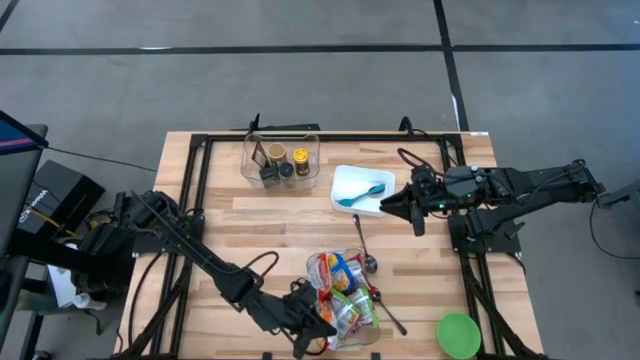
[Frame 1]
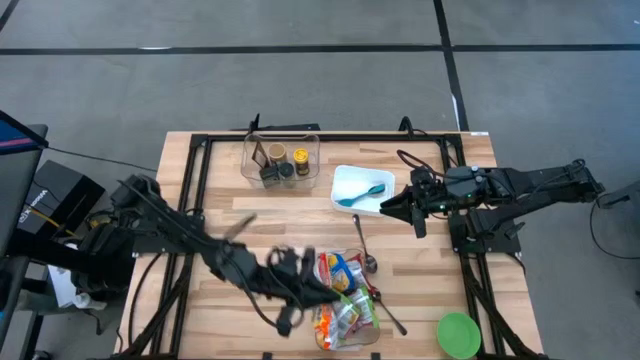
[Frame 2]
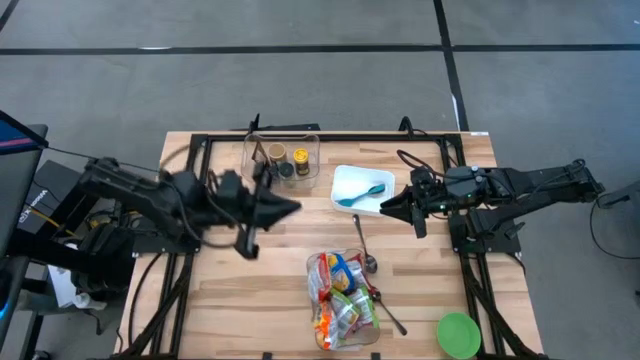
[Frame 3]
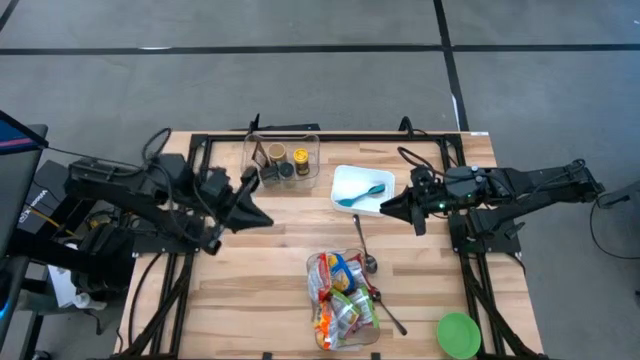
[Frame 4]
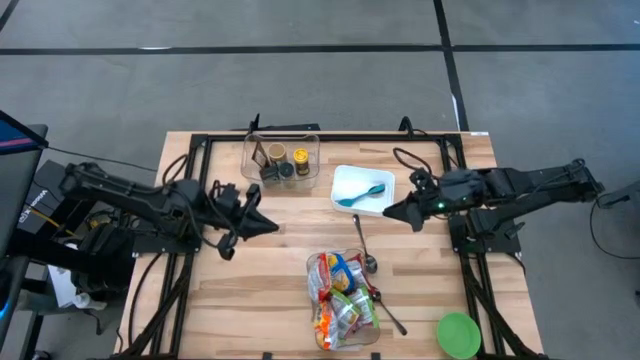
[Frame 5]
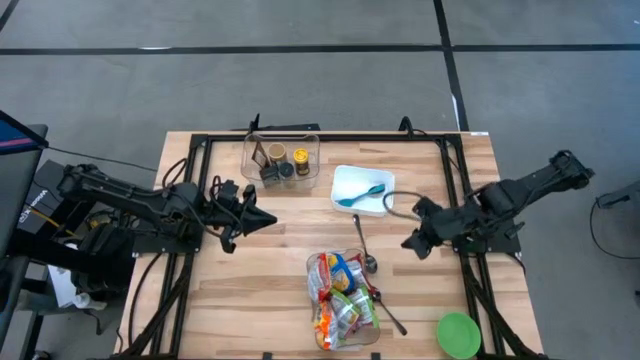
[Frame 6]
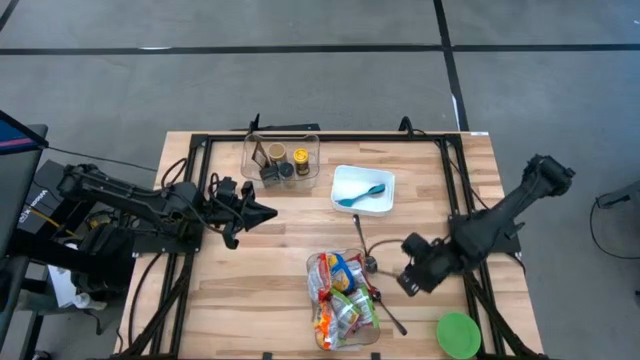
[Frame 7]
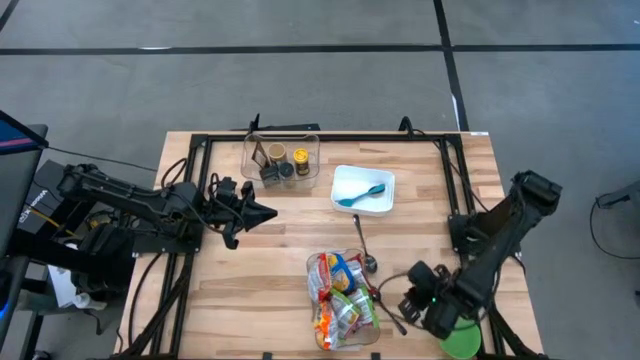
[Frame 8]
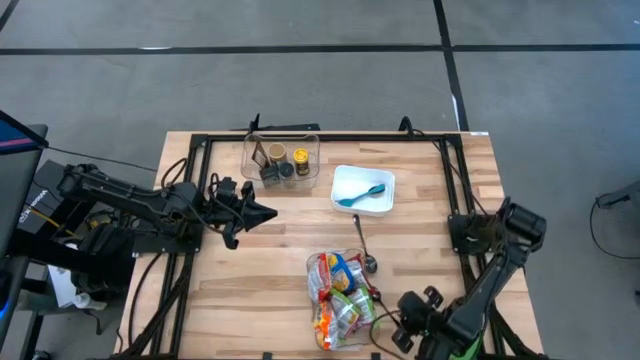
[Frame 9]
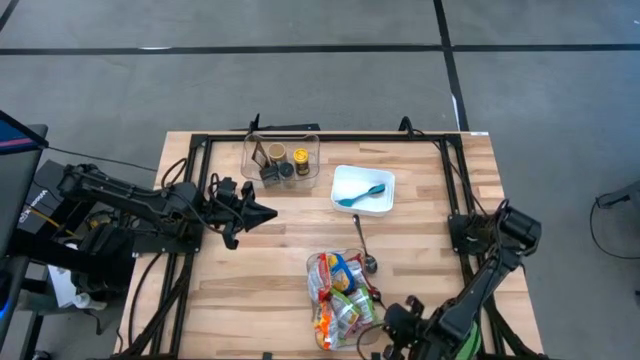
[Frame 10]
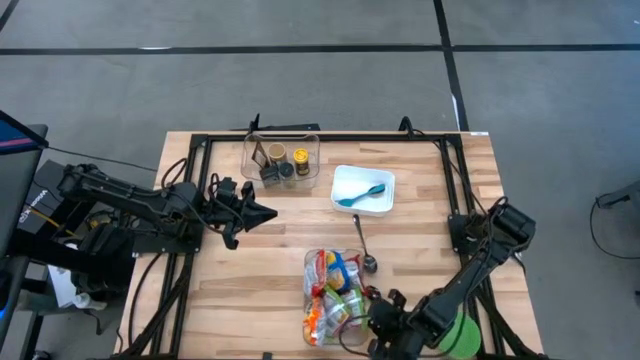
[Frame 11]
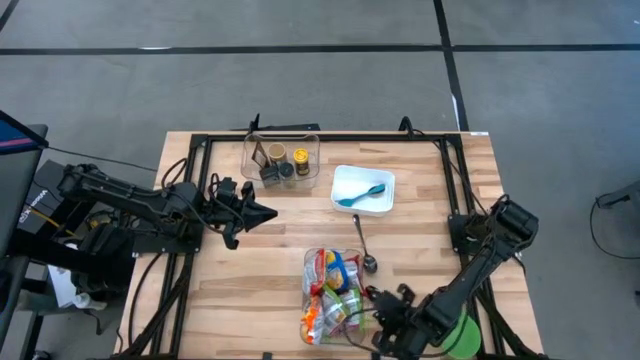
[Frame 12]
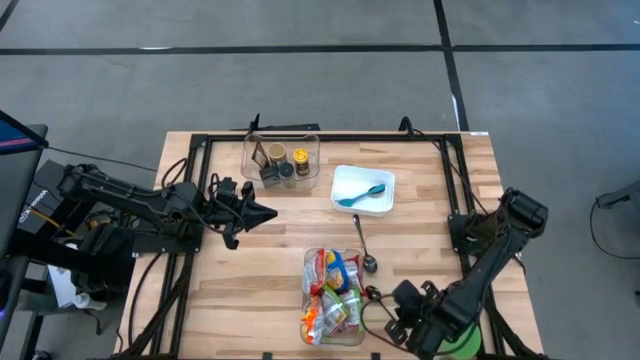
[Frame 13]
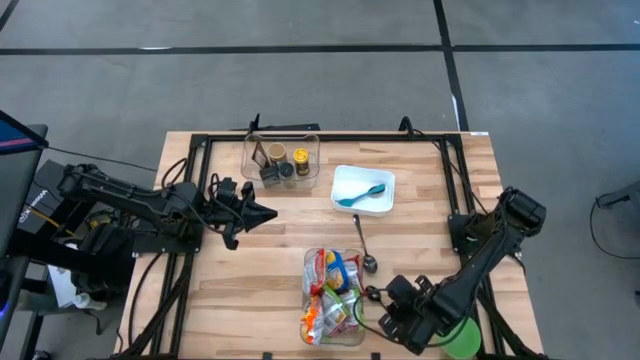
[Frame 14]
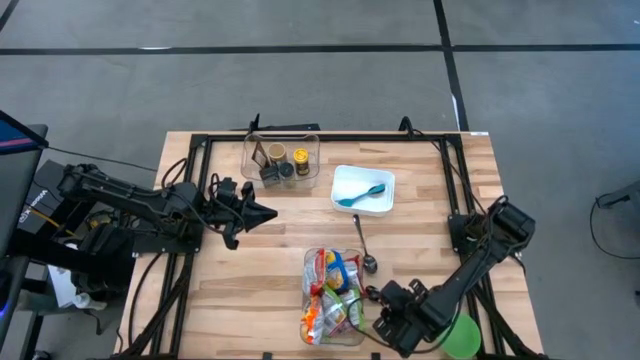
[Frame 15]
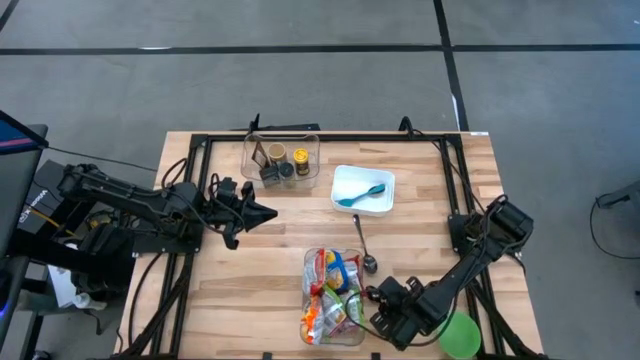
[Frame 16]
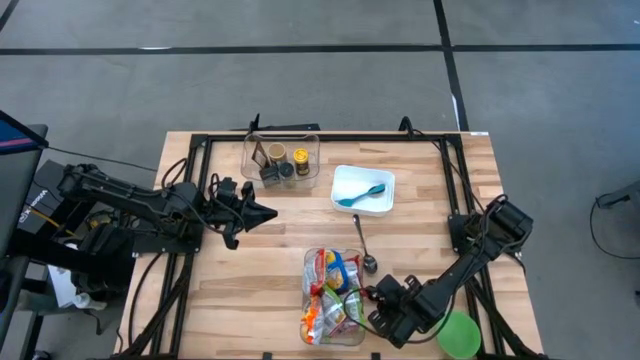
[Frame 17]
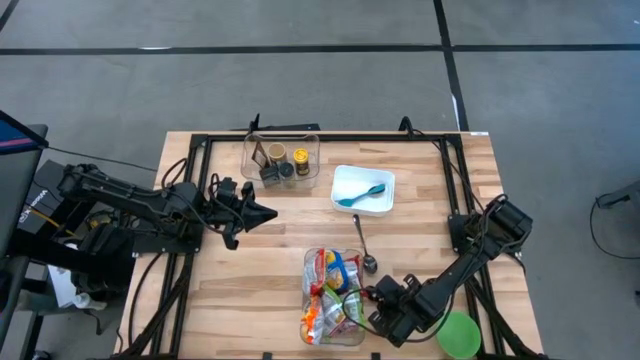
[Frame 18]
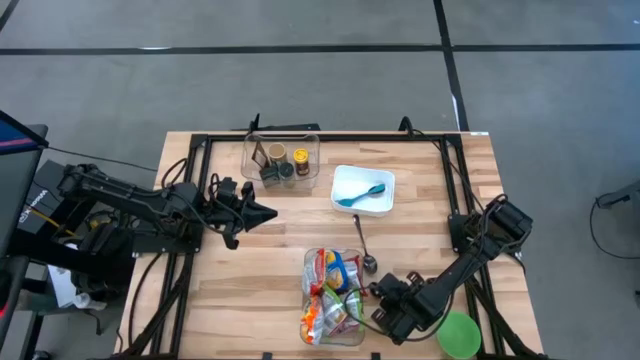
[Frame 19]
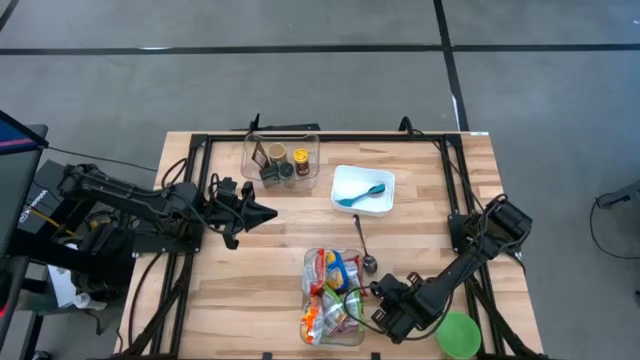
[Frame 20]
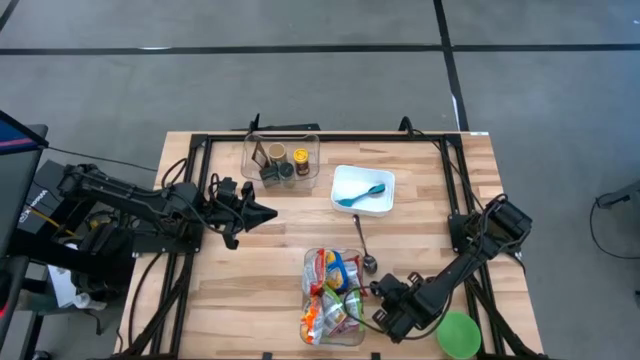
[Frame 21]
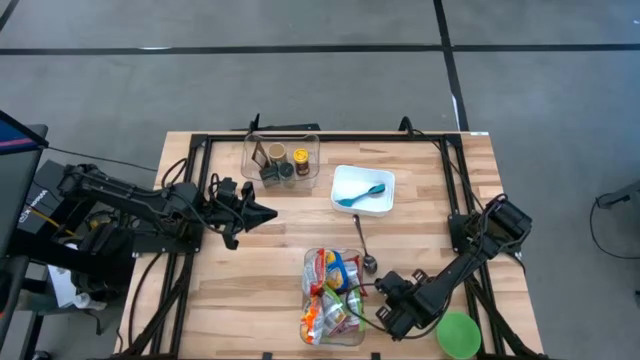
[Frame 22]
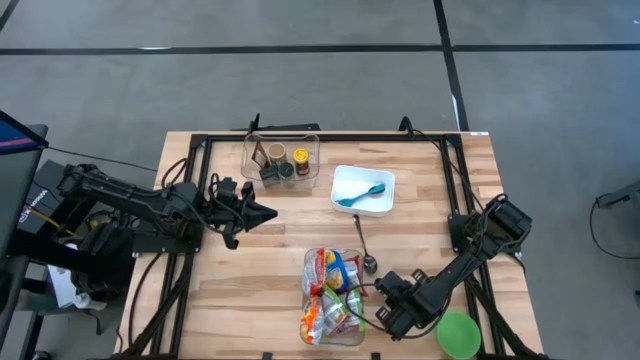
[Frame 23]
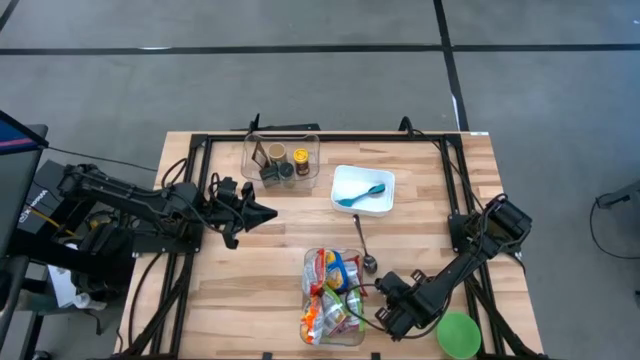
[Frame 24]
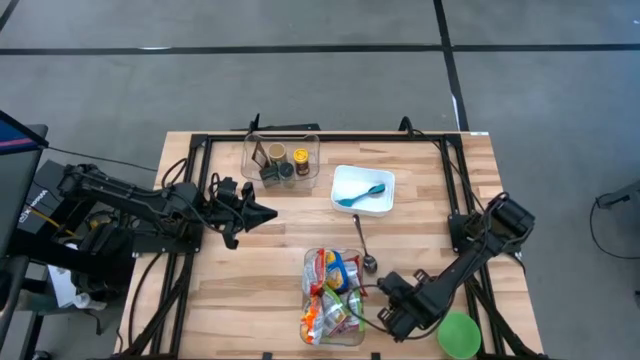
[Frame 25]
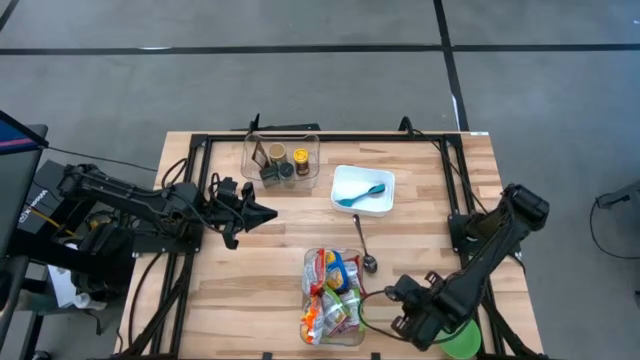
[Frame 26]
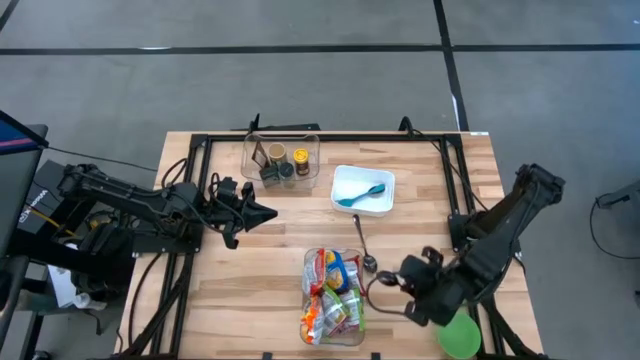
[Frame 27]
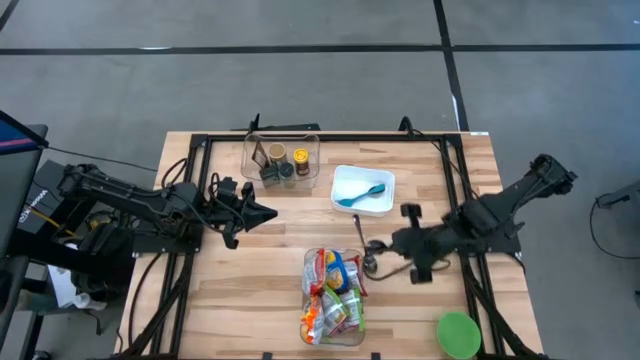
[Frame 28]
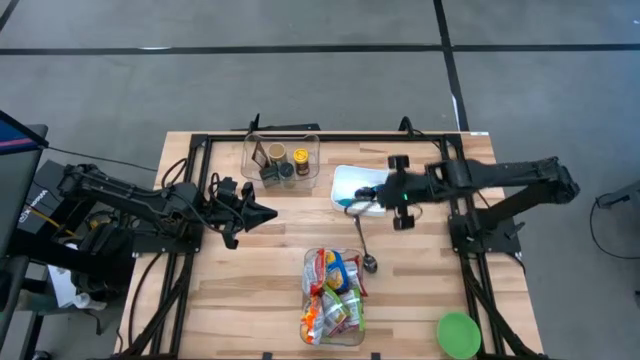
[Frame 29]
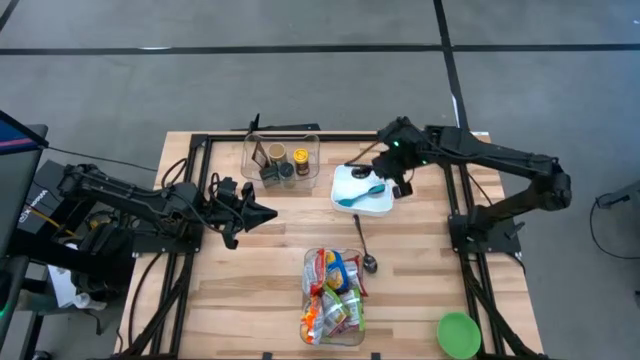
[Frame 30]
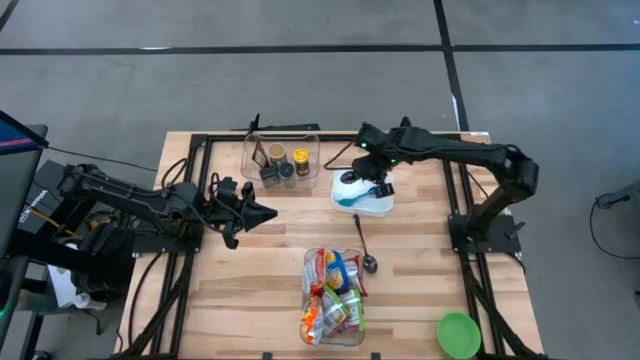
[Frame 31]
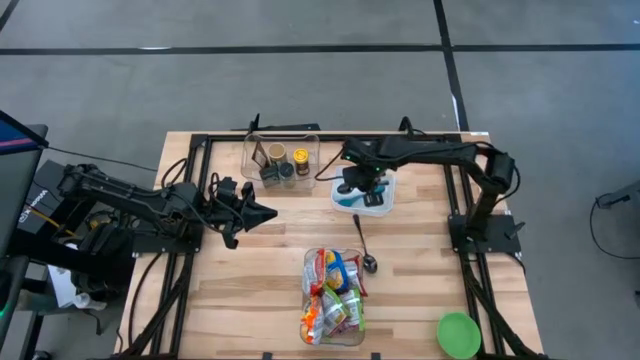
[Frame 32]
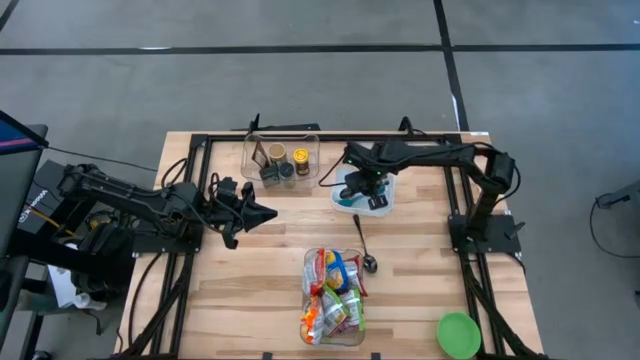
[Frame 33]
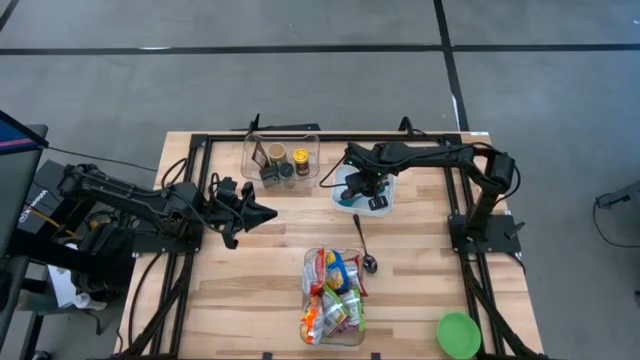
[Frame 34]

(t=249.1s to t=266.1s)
Task: Pick & Place Food Item
Put the bottom black spoon into the white bin

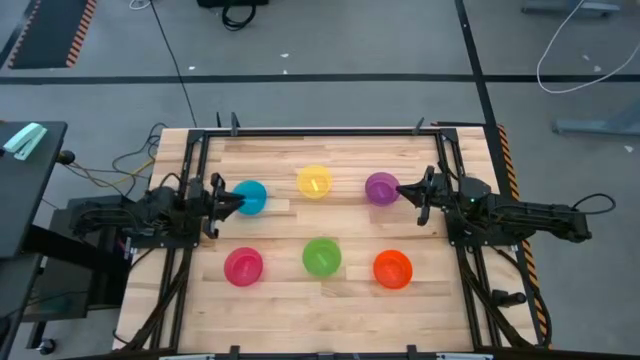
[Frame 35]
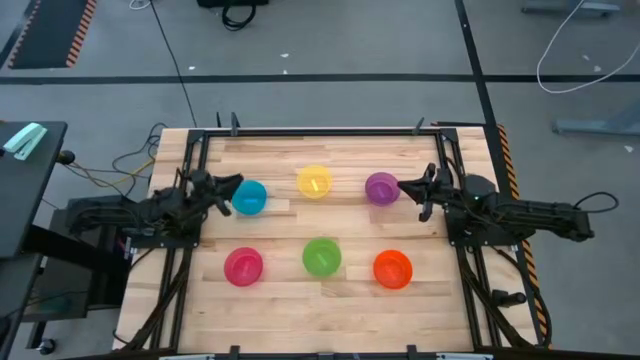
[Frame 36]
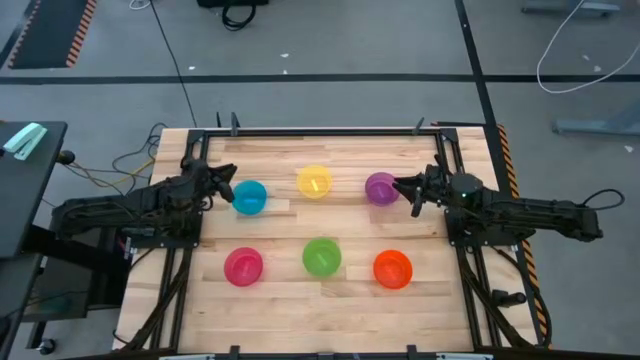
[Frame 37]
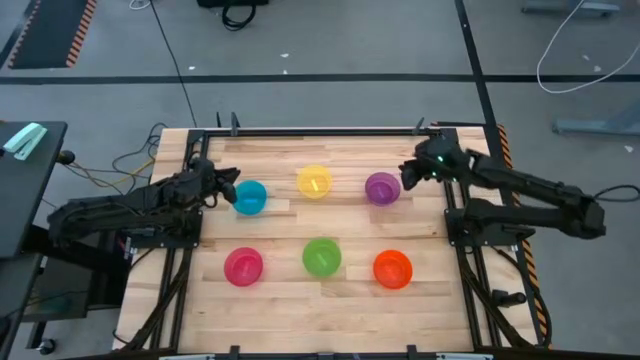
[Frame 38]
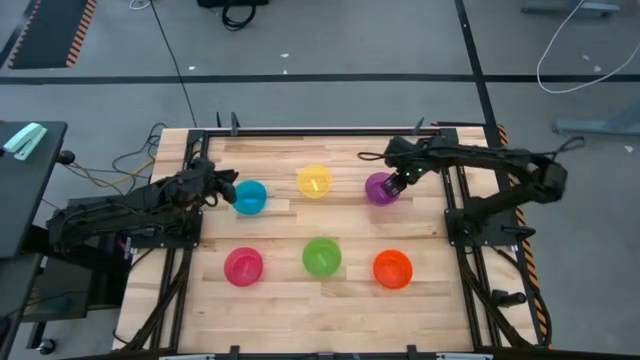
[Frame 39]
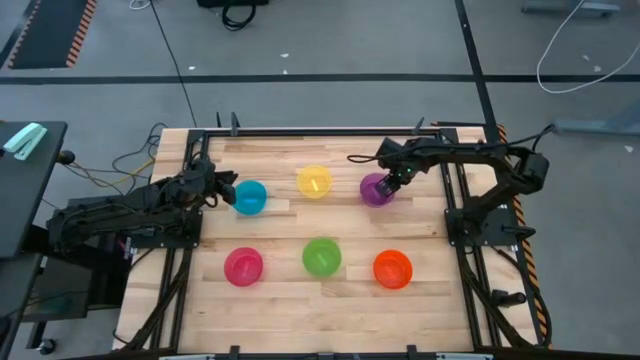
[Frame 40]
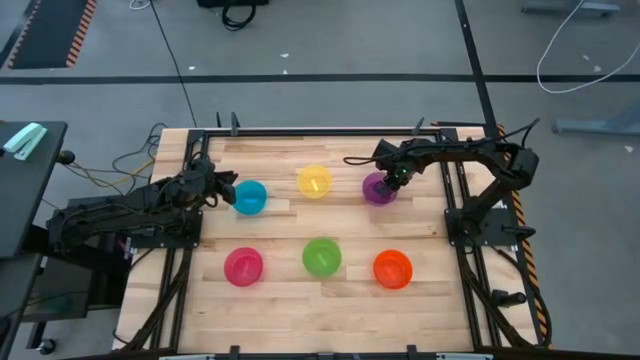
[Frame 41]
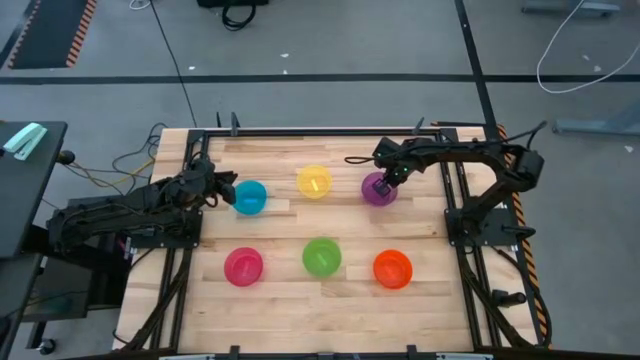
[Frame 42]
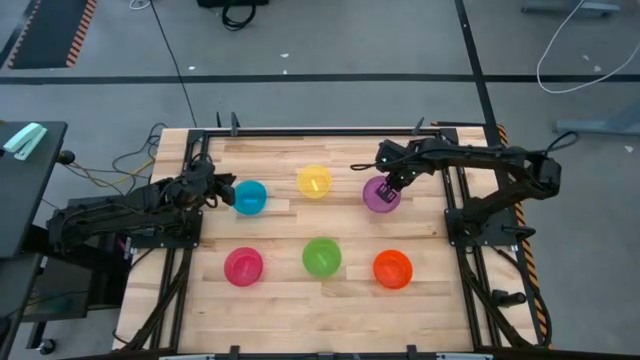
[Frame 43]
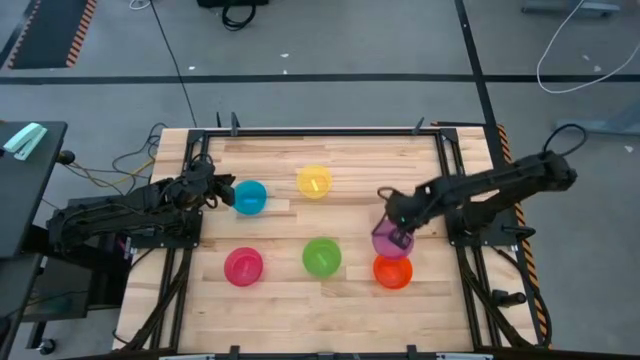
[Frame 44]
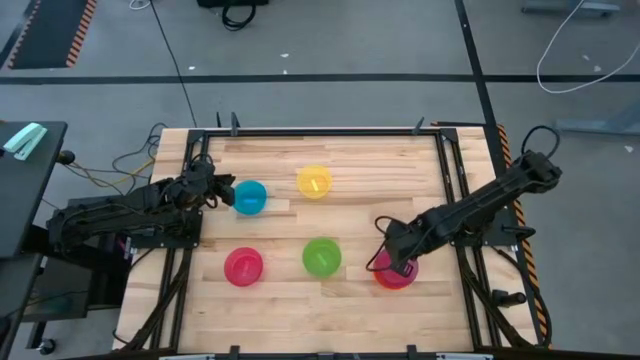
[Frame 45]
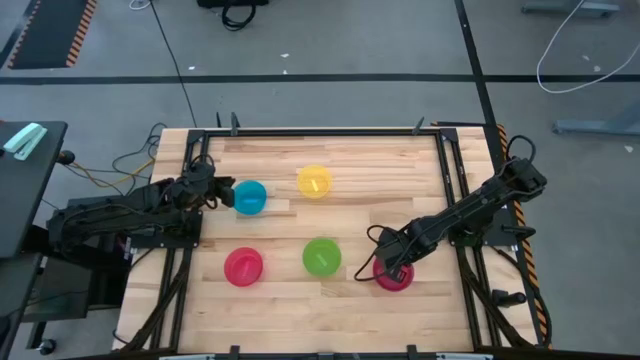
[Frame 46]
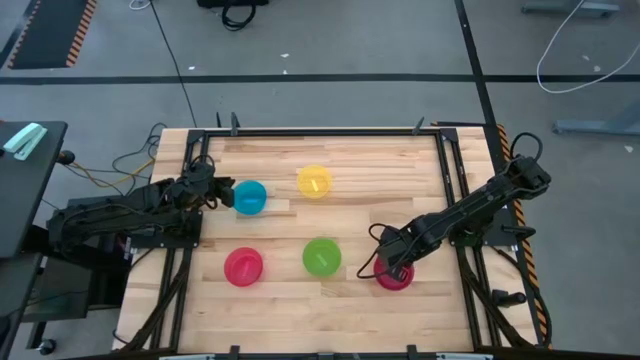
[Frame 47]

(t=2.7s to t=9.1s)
Task: Nest bowls inside each other
Stack the purple bowl on the orange bowl
